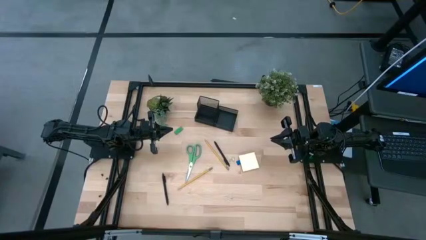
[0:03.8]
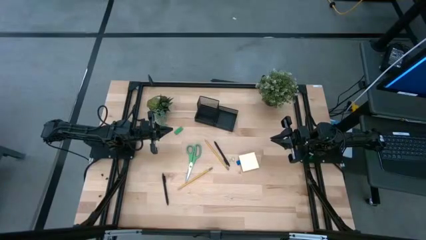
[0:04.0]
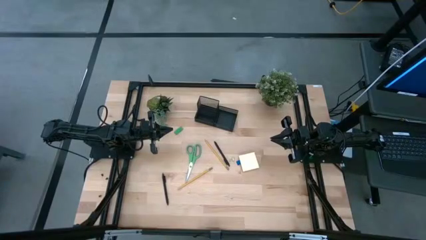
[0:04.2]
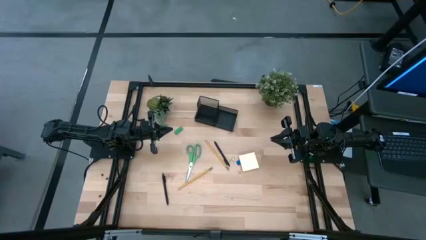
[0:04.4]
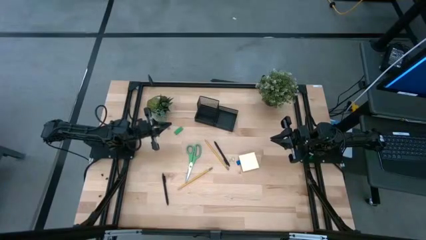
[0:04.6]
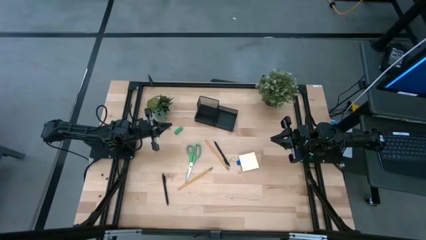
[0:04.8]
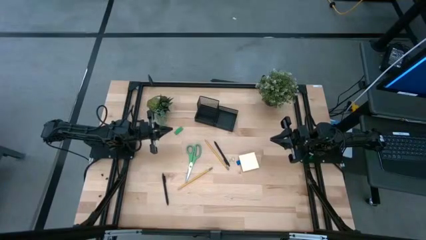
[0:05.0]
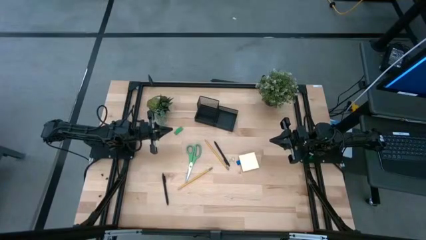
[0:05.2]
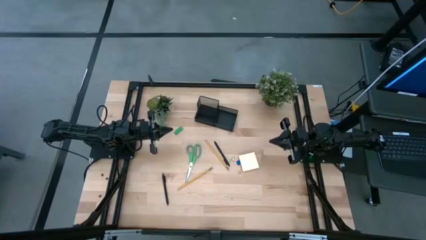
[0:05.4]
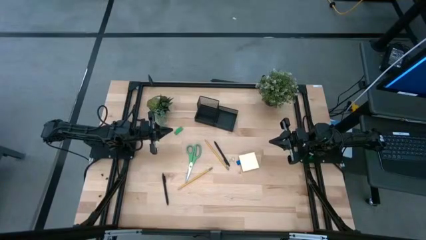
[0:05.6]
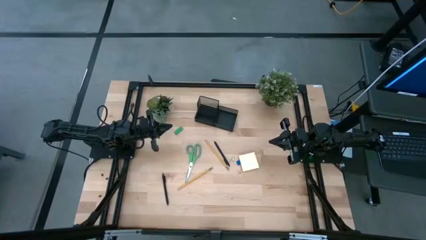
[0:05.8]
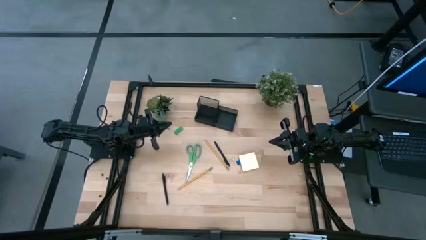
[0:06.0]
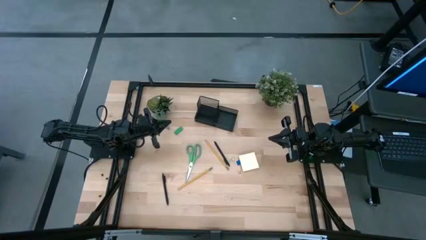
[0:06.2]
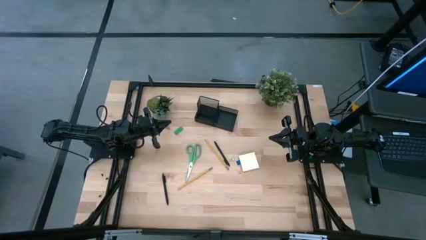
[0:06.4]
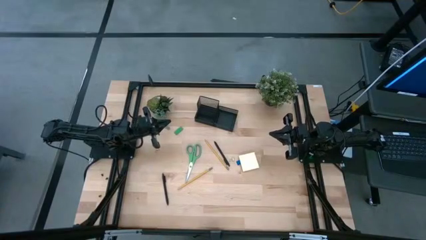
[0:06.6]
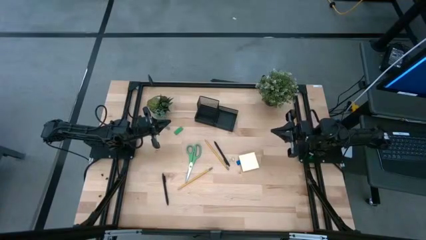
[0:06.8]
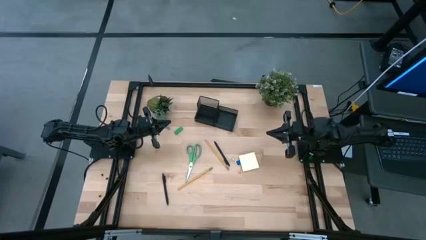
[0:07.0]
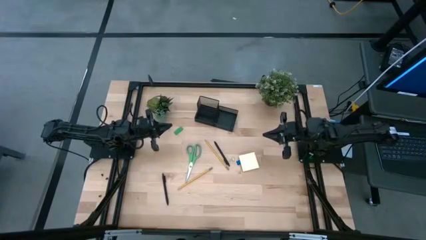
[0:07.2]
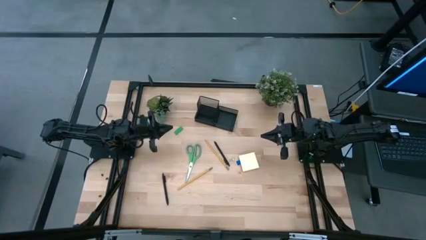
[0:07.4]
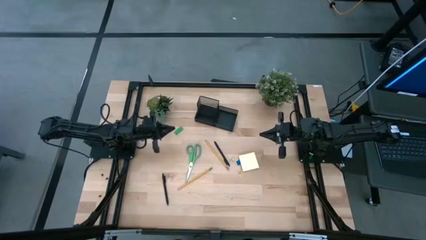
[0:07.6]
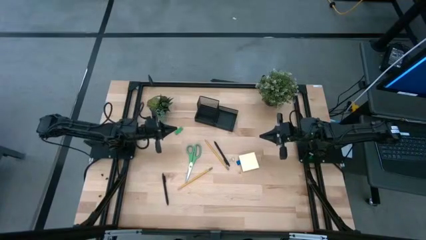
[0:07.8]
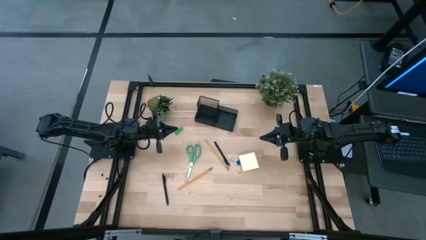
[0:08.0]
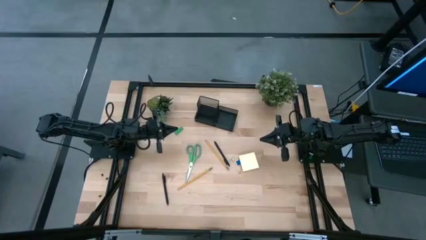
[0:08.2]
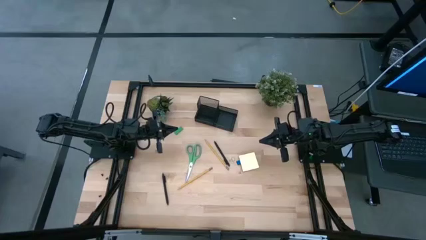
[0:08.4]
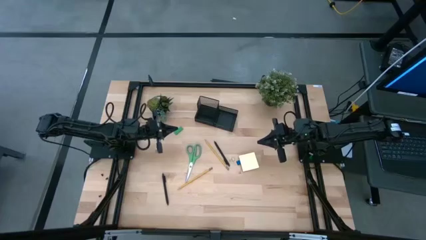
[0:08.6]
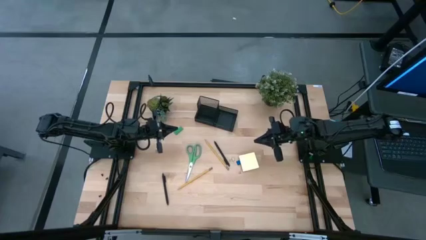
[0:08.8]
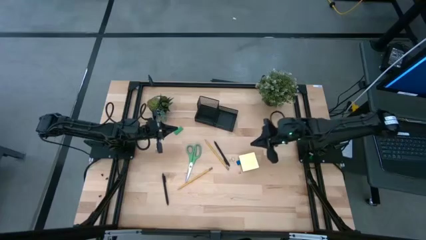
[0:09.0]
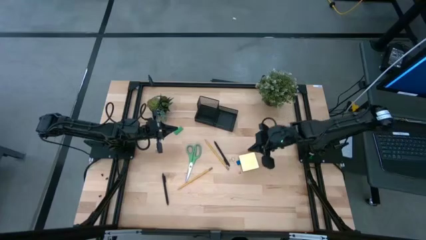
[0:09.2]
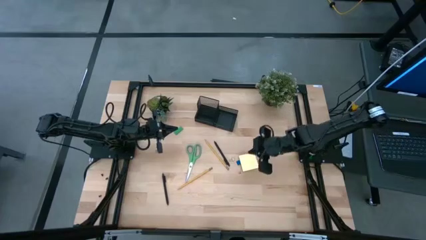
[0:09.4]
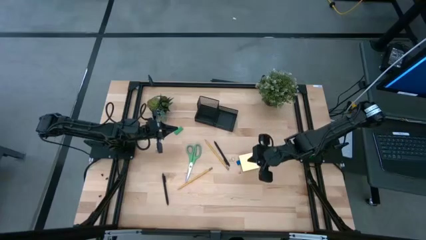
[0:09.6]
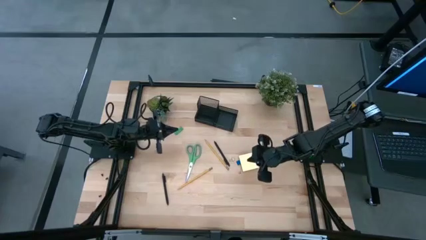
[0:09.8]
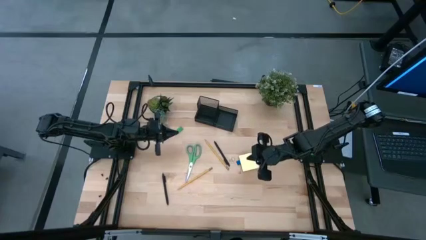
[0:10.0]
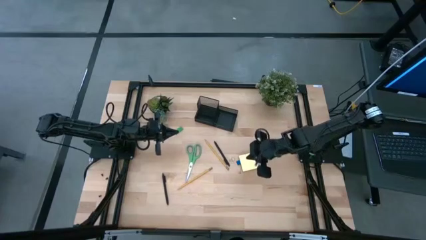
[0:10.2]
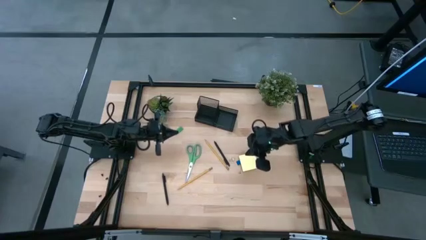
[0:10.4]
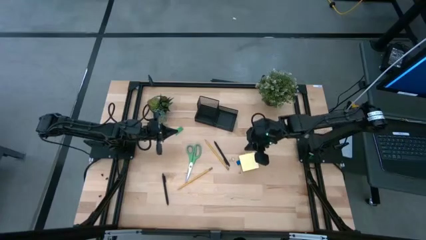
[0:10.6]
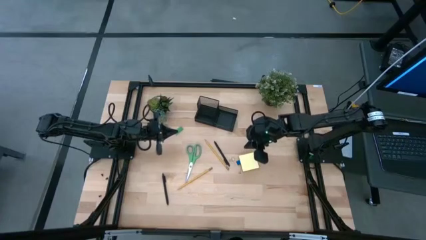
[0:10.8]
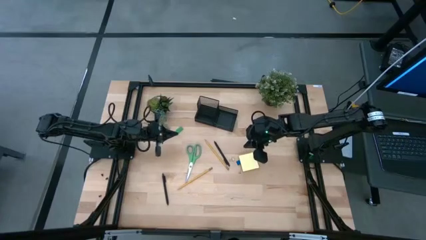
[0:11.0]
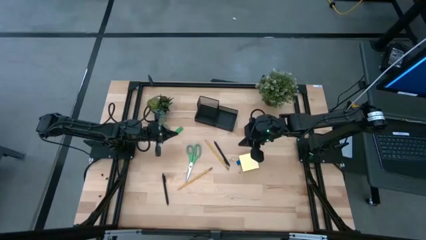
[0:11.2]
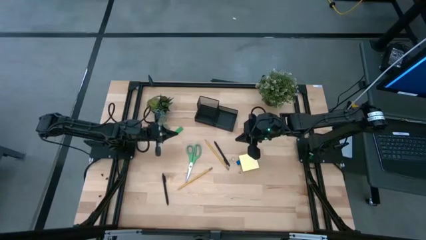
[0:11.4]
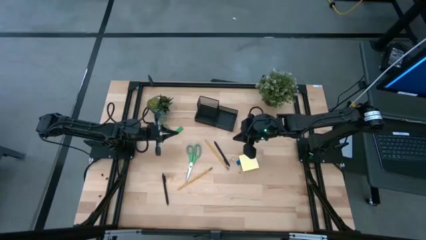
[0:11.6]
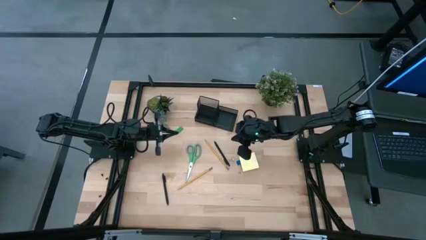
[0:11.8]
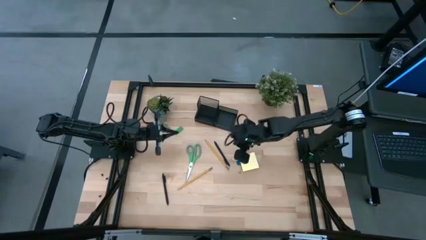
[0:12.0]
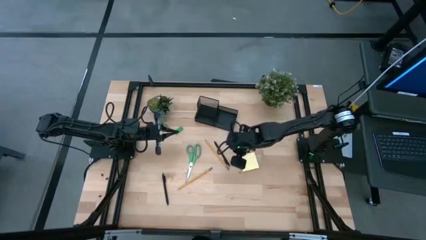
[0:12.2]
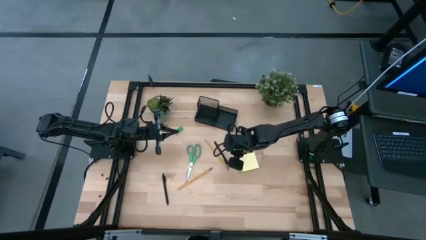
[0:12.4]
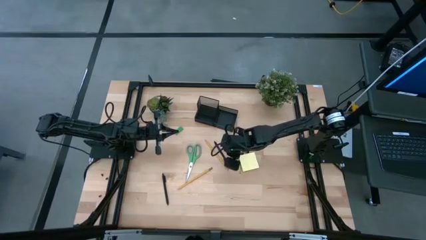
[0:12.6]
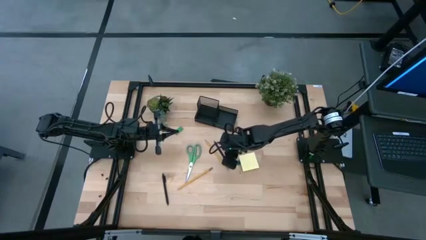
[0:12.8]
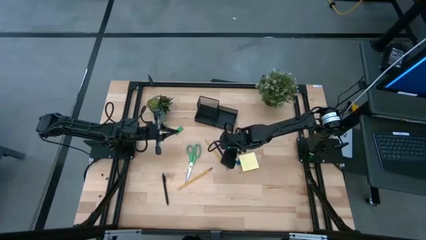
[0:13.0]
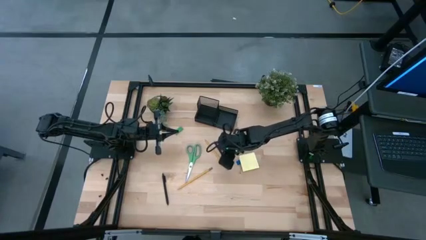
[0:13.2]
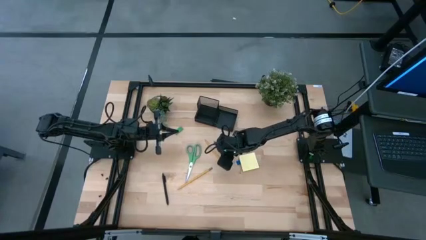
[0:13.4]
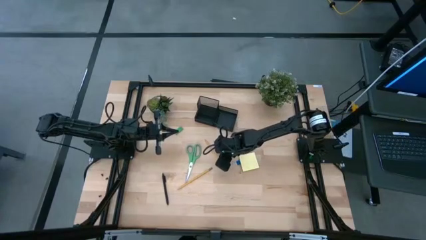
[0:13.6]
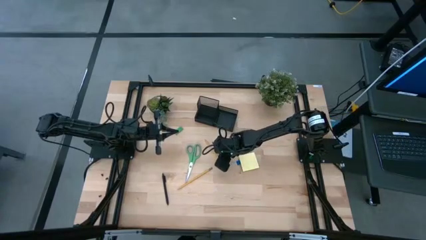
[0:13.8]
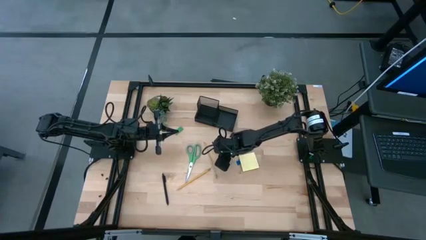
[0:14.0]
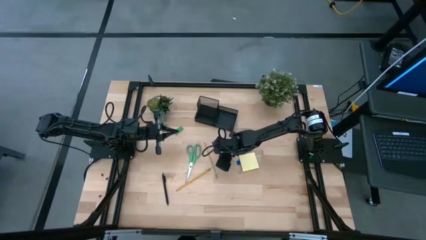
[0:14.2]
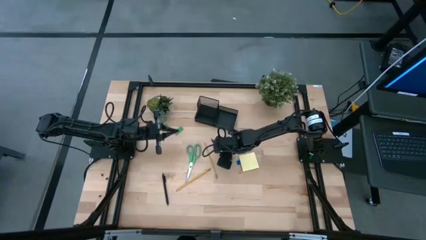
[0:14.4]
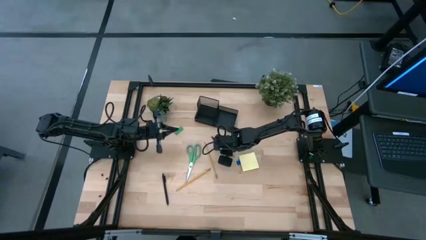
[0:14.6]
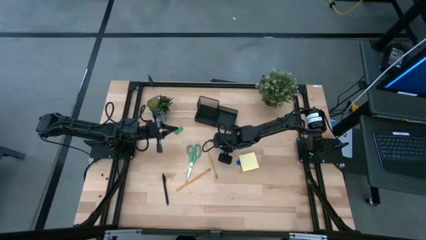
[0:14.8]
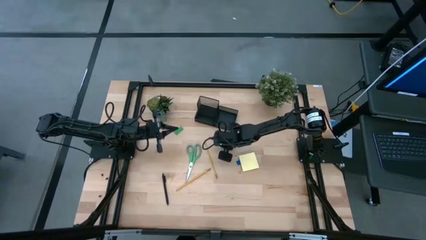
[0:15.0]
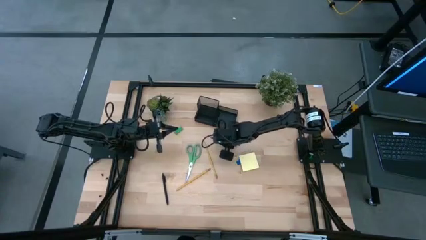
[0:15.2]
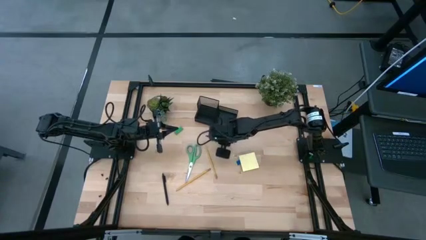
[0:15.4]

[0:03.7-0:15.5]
Task: Pick and place office supplies into organizer
Put the top pen into the desk organizer

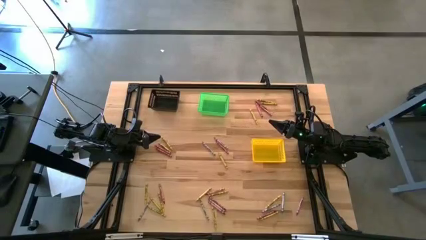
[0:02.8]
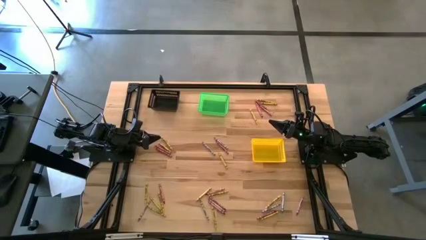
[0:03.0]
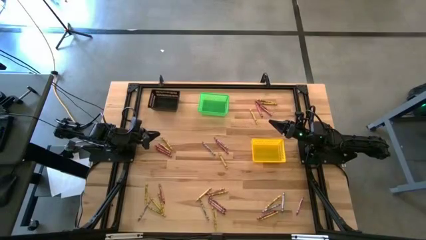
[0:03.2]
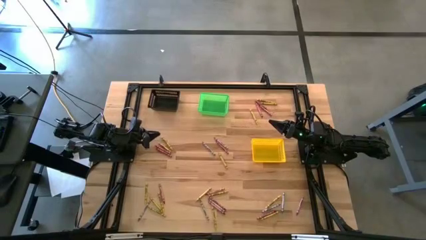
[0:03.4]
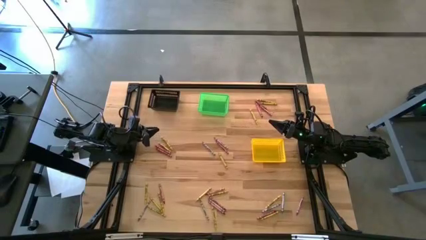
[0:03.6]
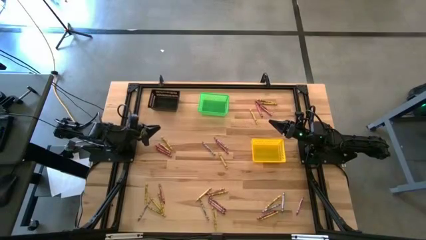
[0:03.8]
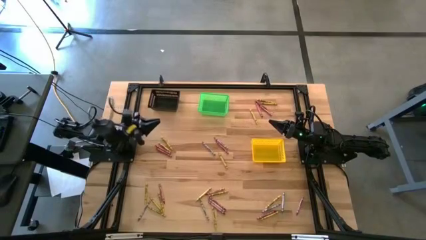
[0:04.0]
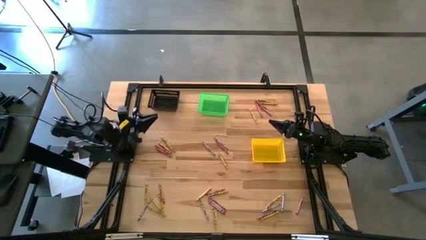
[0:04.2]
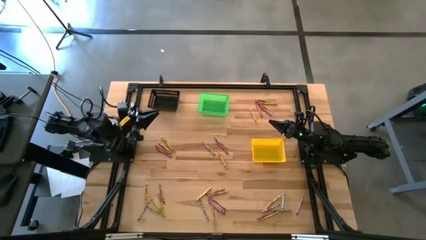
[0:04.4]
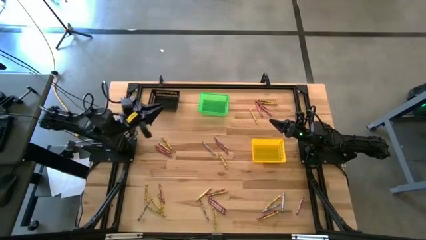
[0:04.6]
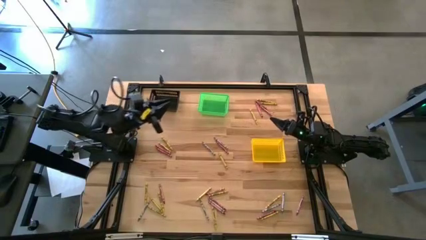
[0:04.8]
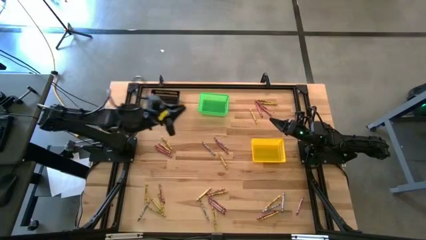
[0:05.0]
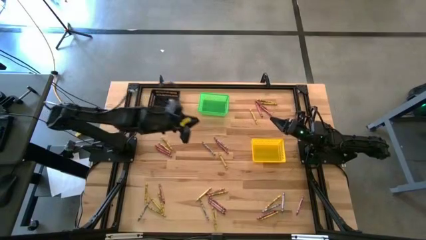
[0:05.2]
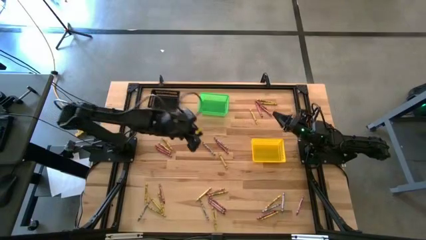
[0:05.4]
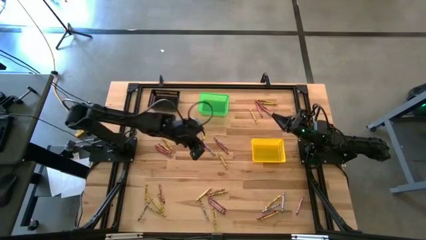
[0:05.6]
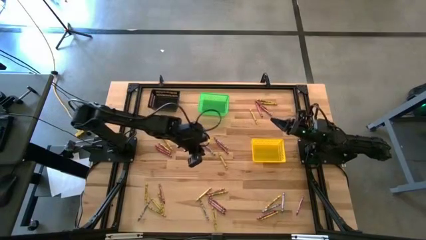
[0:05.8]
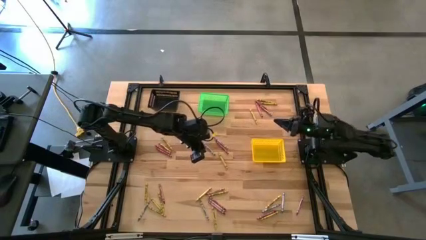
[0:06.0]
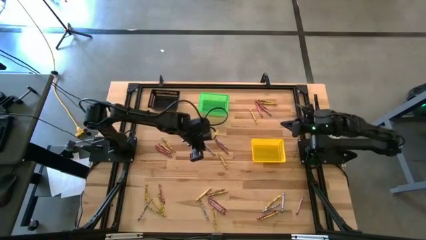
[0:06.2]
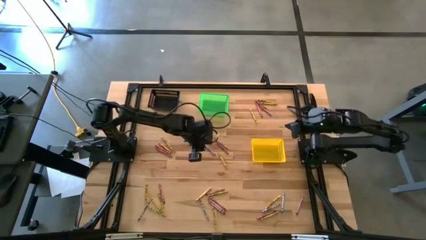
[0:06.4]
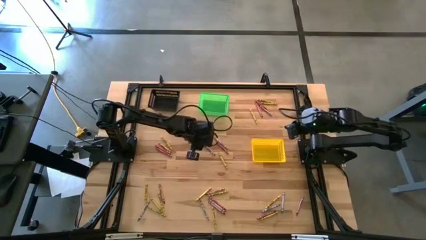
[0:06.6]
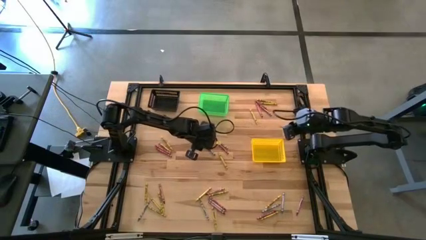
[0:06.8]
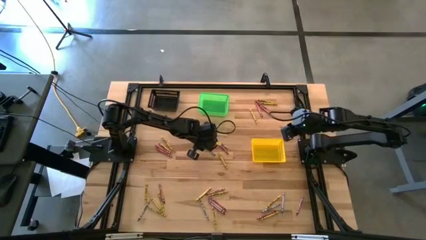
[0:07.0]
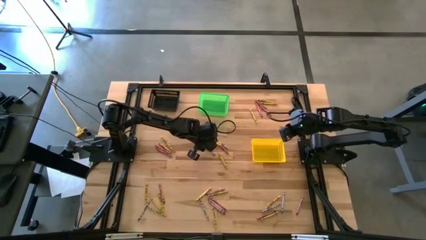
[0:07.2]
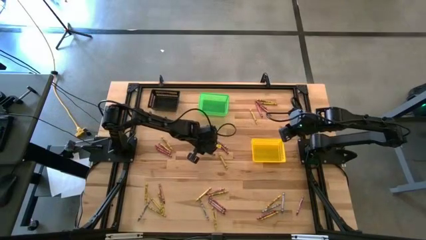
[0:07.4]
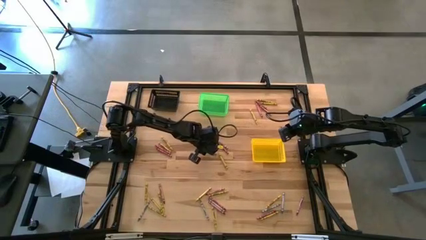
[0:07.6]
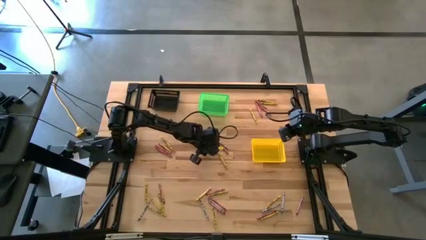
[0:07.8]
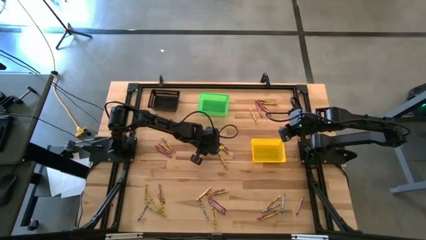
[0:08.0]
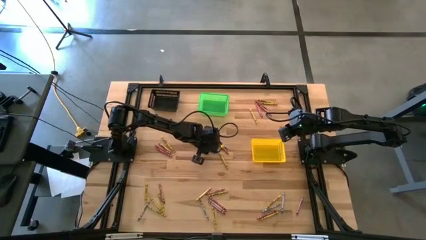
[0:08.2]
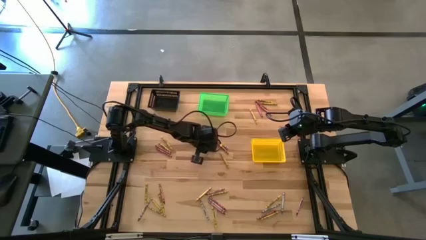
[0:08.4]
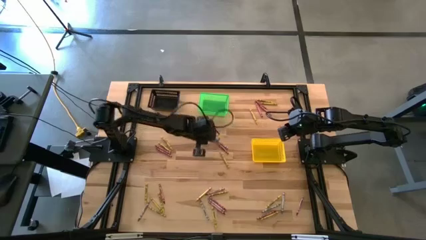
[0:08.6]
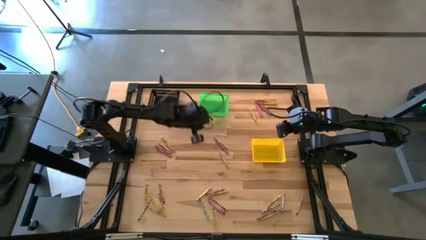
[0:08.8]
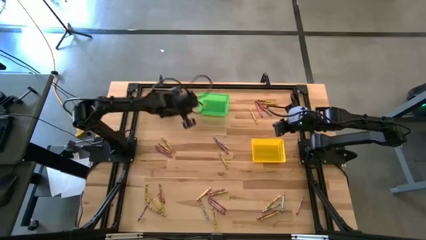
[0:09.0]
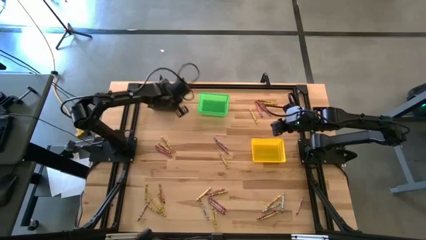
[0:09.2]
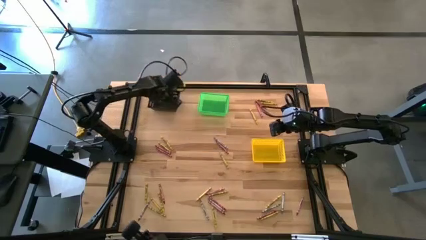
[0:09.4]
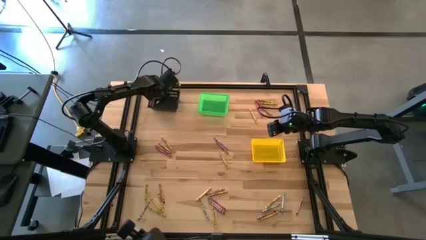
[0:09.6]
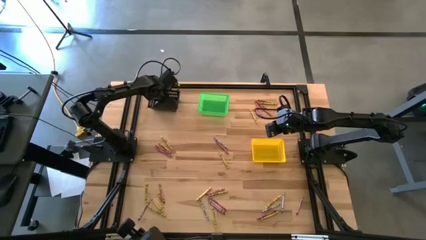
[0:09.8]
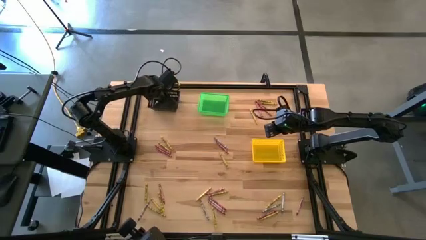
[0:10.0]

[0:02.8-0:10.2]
Task: Sort crayons
Put the gray crayon into the black basket
